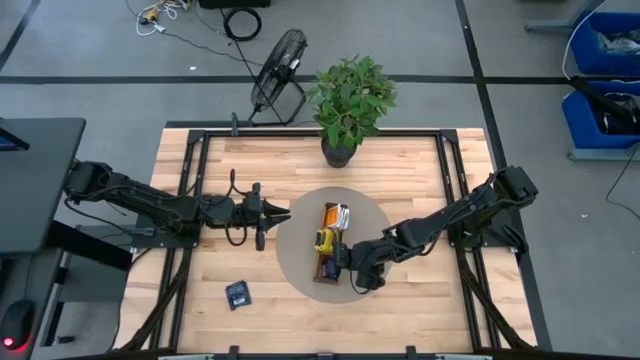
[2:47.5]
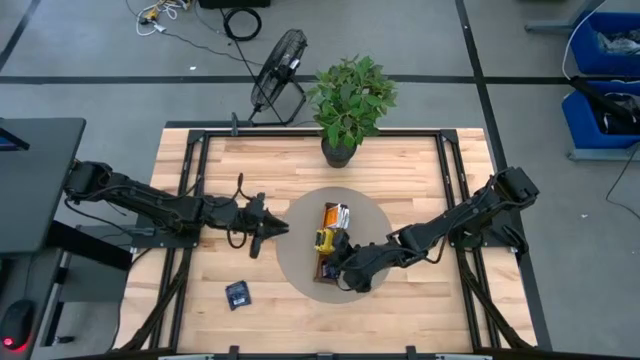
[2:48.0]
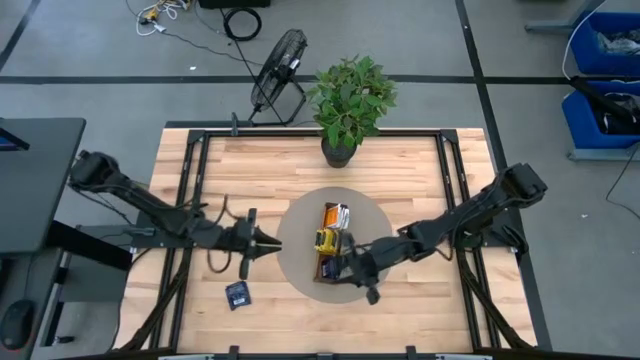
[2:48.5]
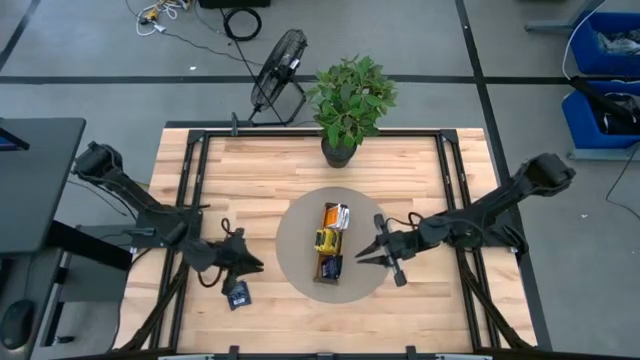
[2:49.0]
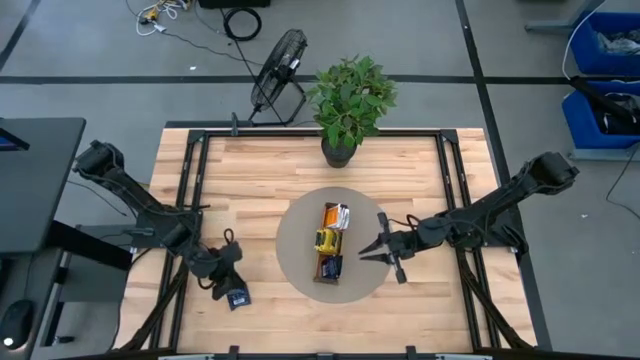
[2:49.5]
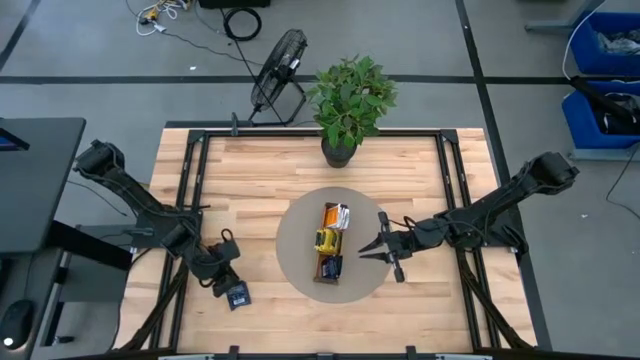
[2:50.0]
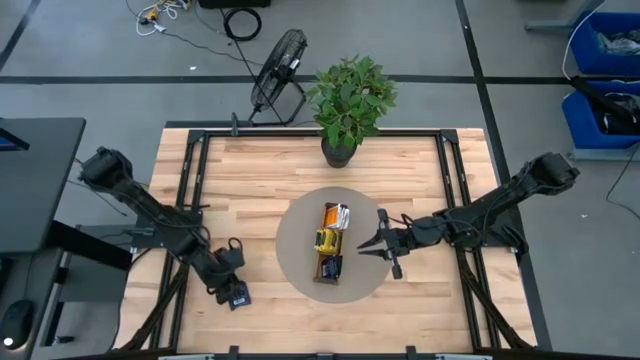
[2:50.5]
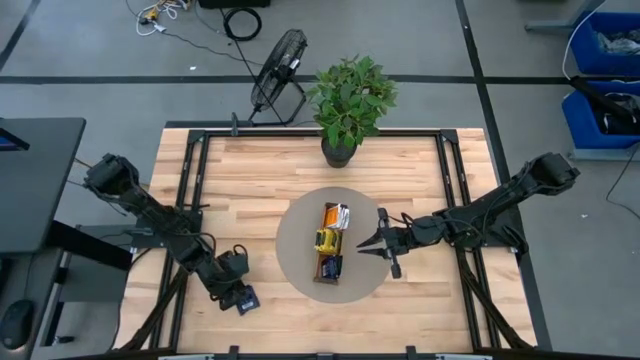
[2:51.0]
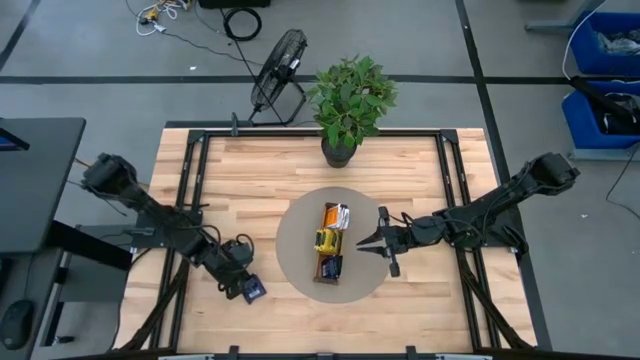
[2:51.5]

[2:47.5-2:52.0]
Task: Pick & Place Tea
Put the purple tea bag into the bottom compartment of the bottom section wooden organizer

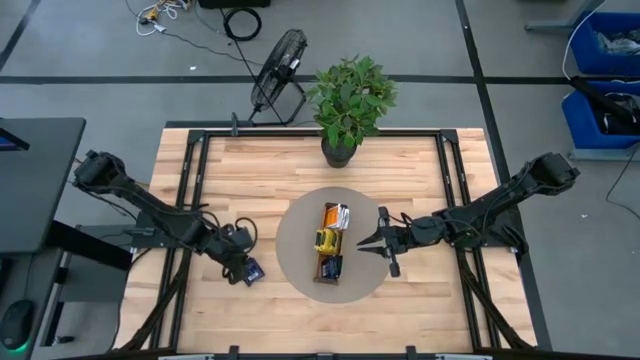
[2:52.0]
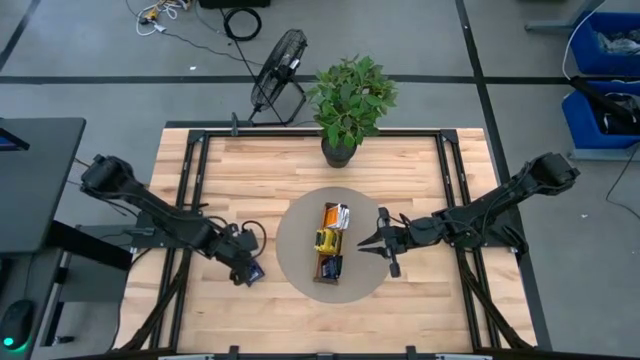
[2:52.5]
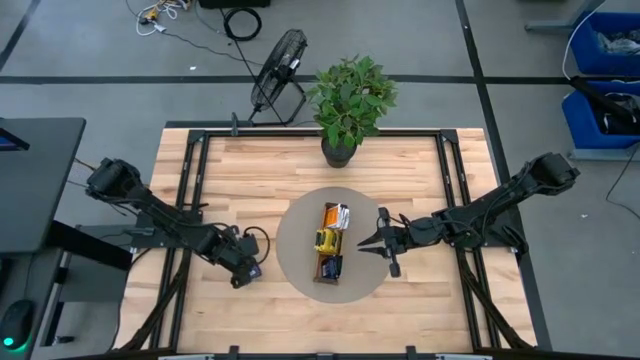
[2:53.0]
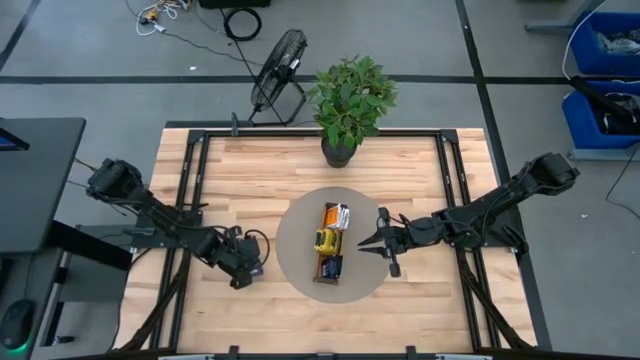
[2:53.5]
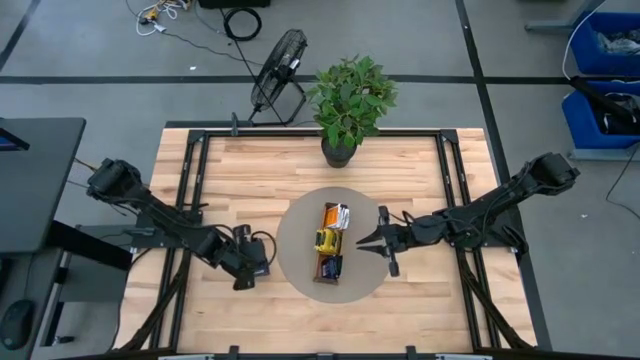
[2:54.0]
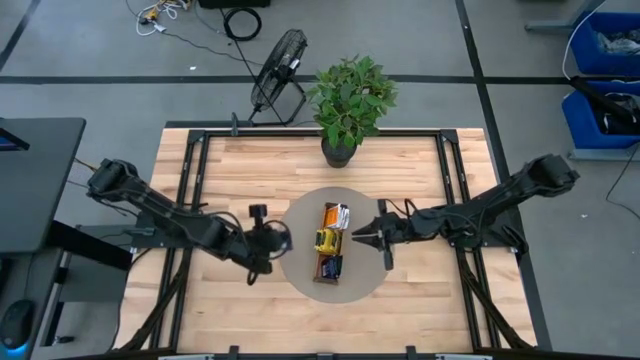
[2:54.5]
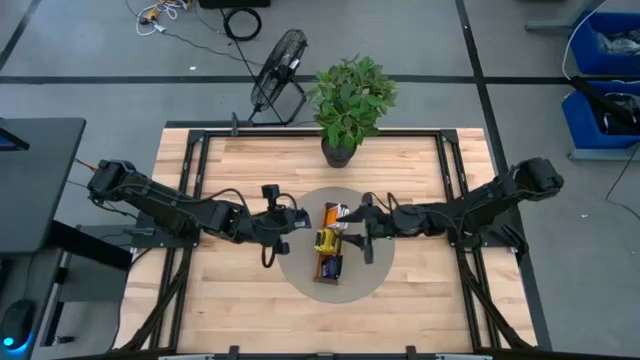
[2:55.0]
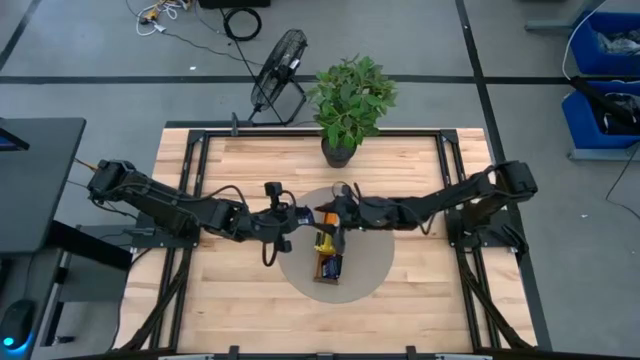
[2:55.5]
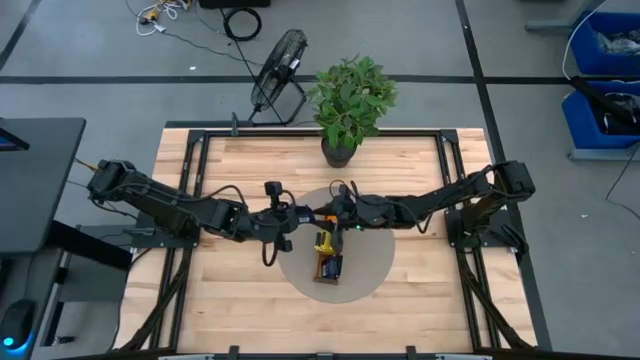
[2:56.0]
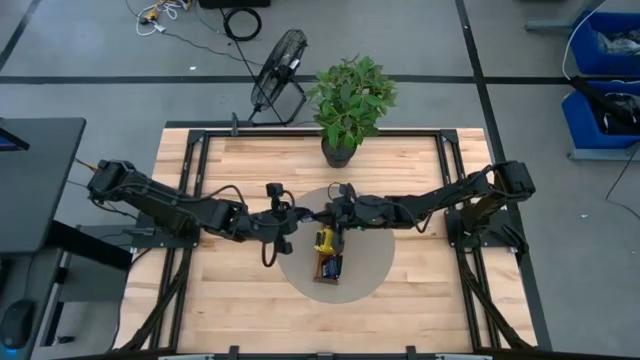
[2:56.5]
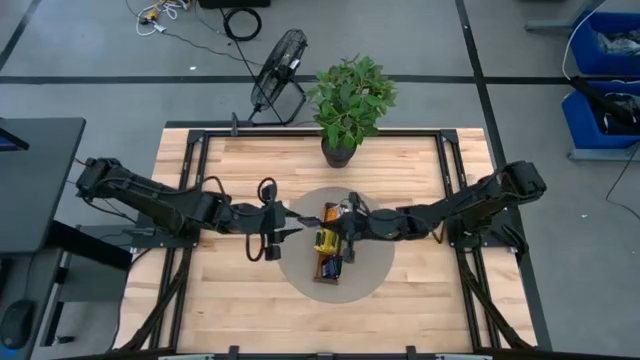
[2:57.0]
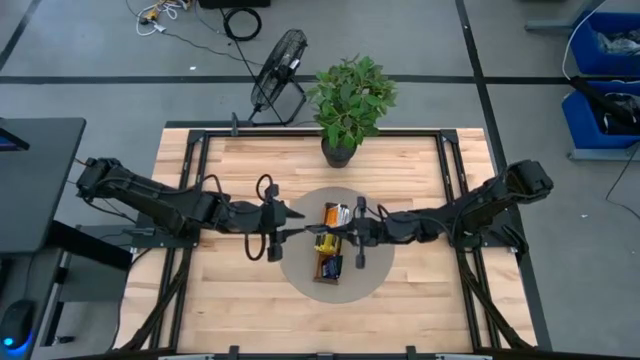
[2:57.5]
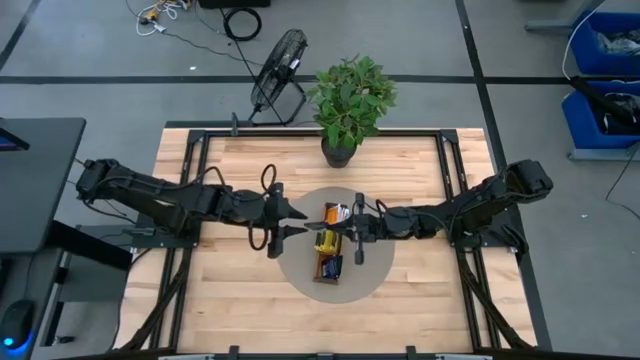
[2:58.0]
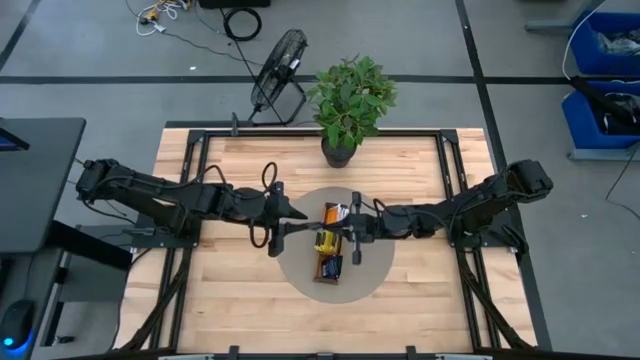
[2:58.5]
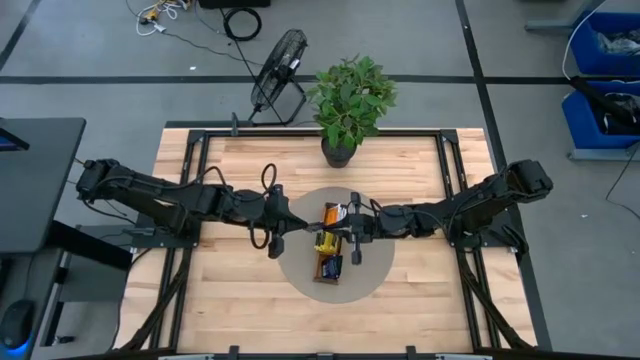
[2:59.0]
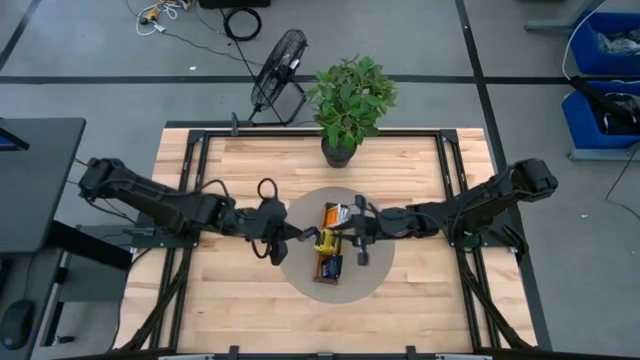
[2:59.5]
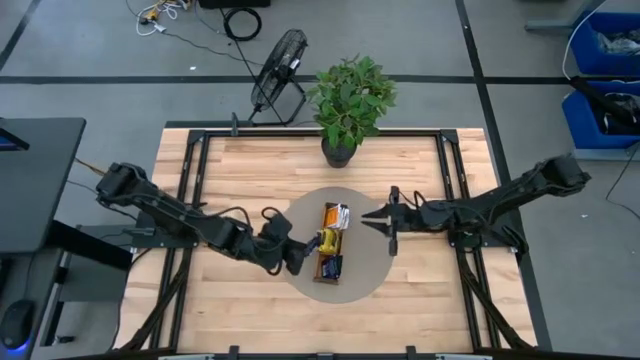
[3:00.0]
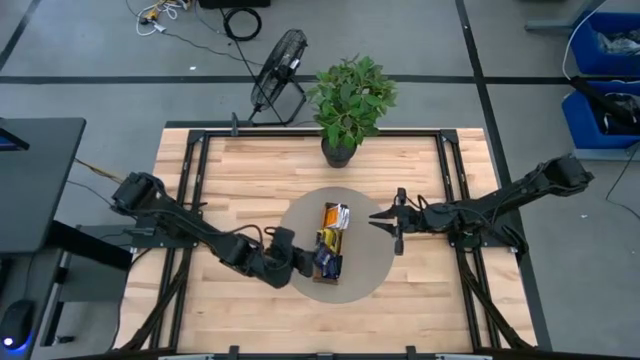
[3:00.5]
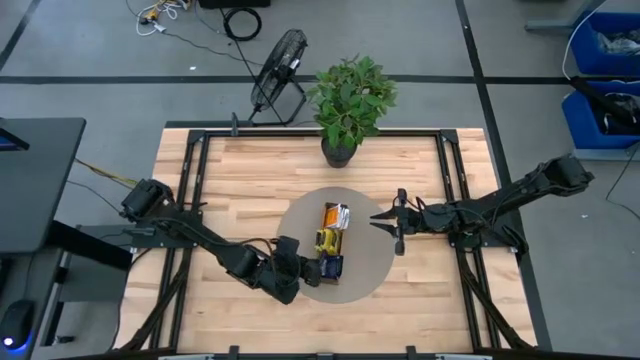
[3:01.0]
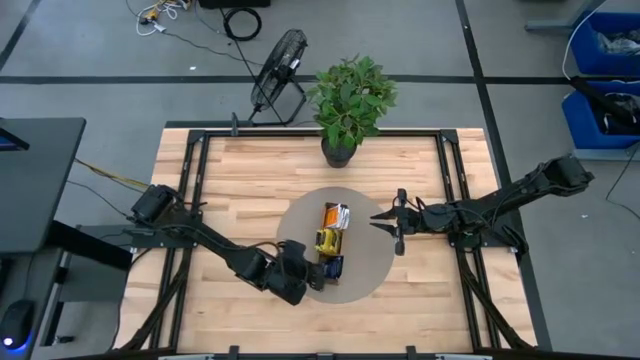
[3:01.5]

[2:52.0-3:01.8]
Put the purple tea bag into the bottom compartment of the bottom section wooden organizer

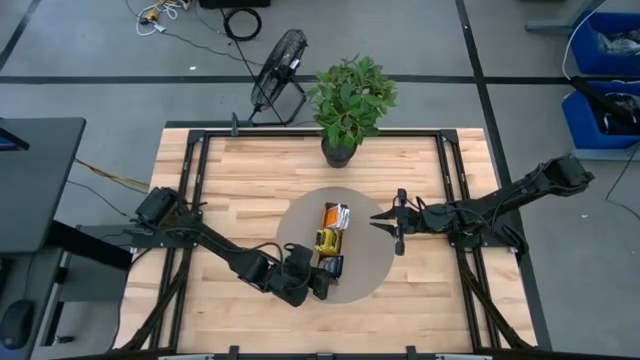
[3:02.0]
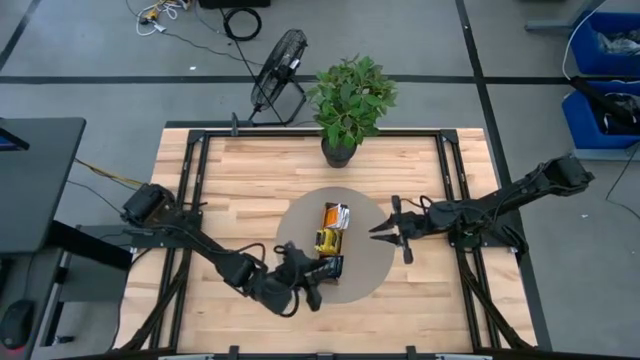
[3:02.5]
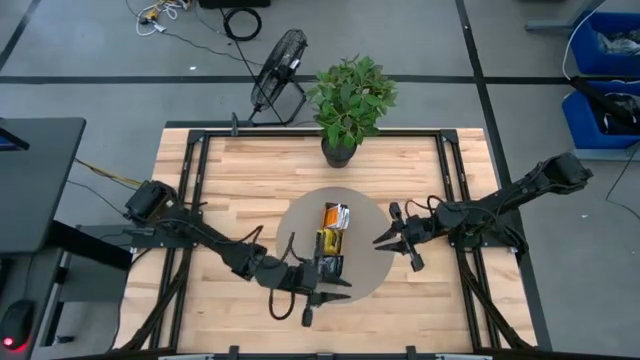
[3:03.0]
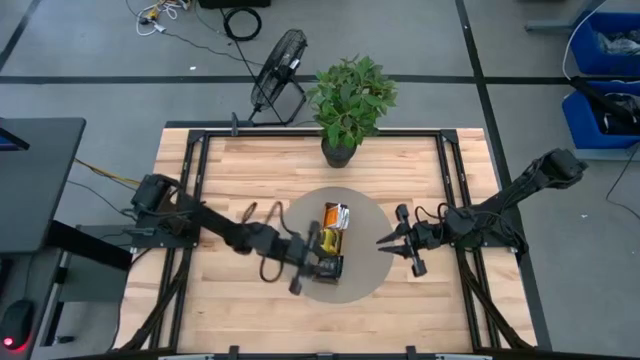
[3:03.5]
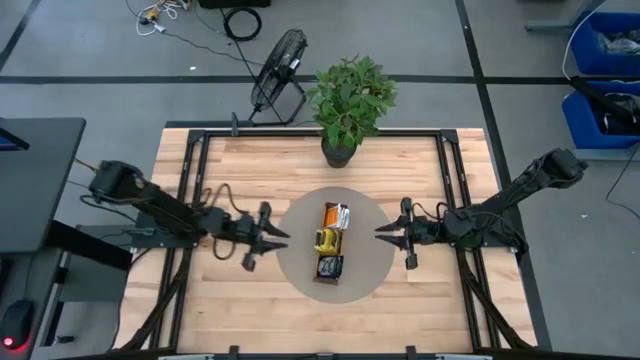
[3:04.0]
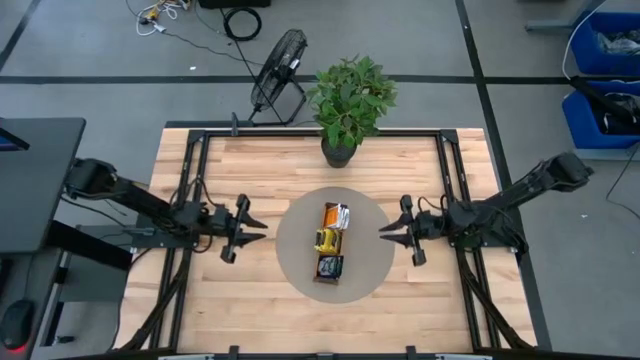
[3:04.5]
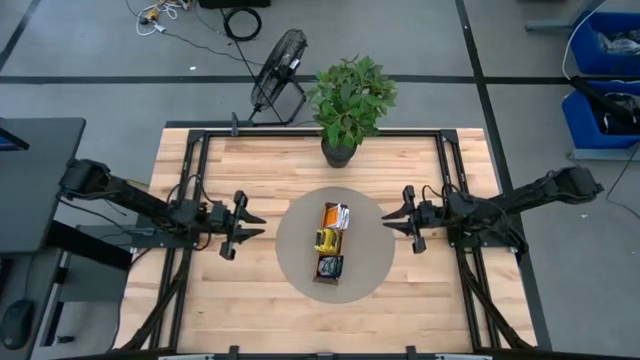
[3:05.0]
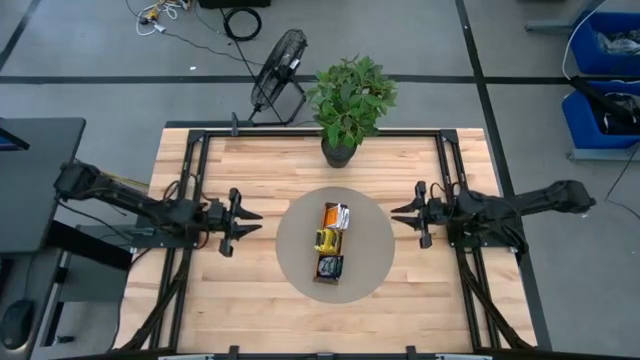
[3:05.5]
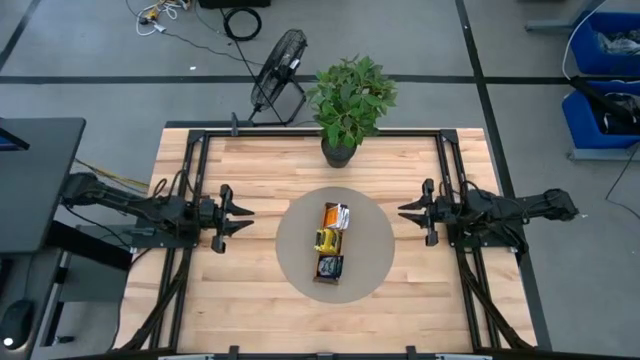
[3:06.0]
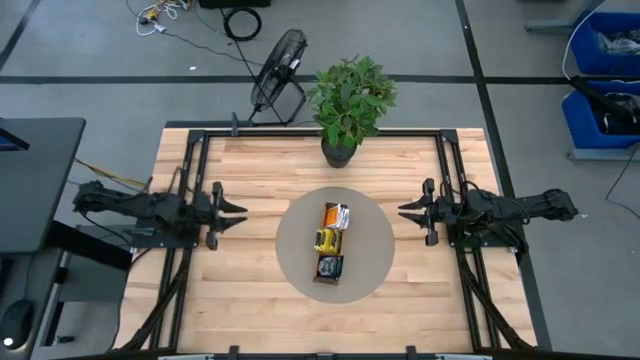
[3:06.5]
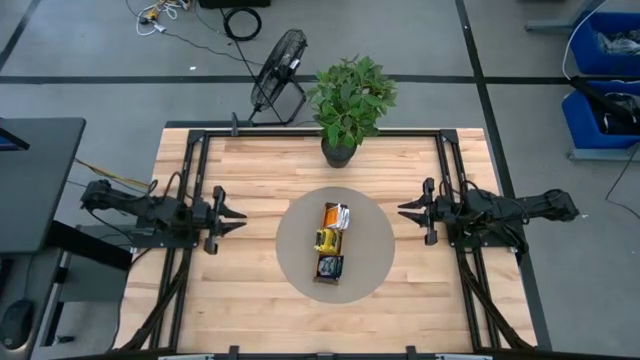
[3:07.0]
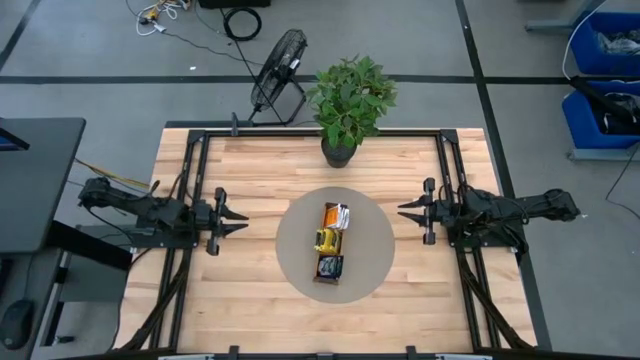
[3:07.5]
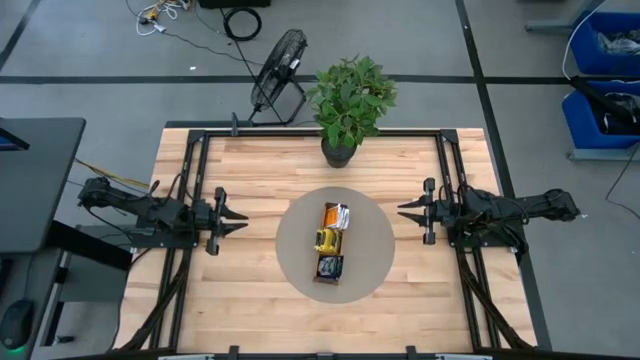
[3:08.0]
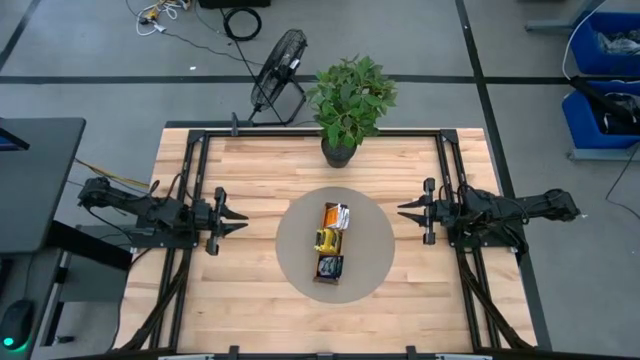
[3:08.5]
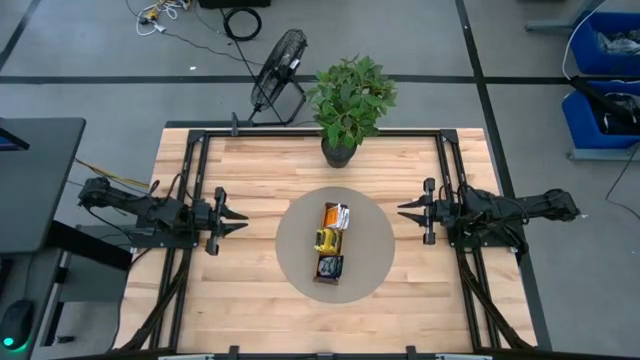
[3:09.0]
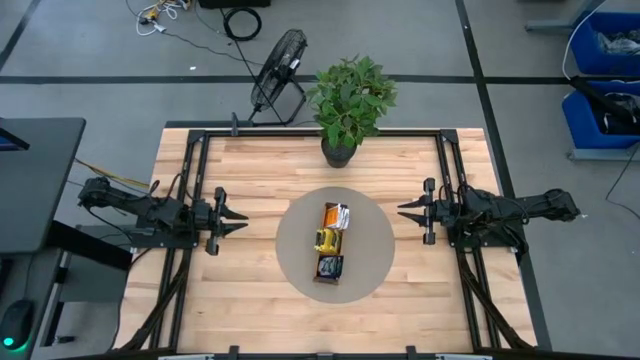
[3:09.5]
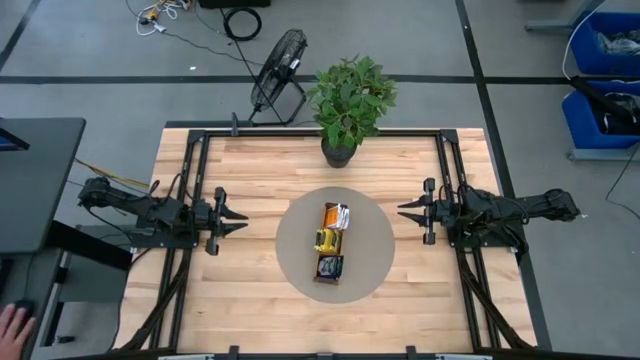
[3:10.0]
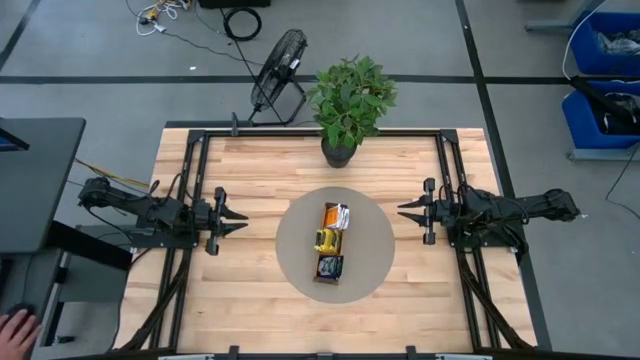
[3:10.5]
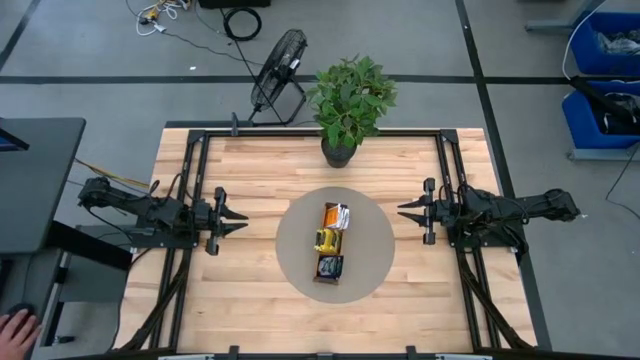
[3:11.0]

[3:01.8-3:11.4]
Return to Home Position
